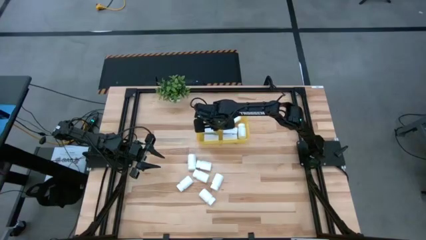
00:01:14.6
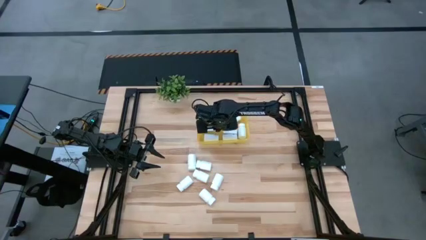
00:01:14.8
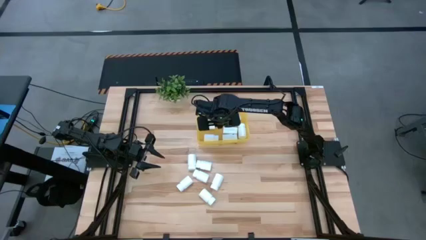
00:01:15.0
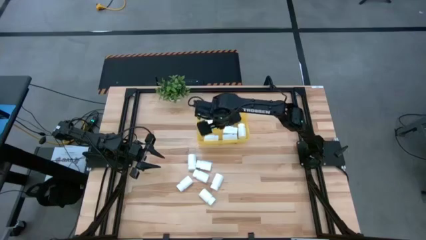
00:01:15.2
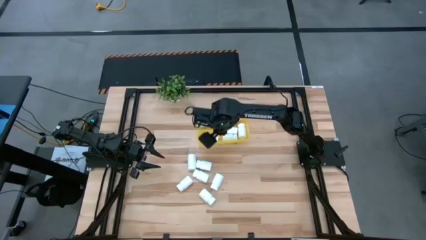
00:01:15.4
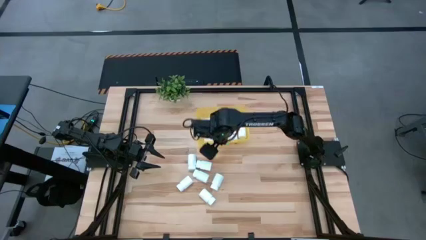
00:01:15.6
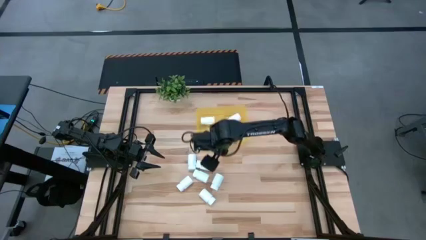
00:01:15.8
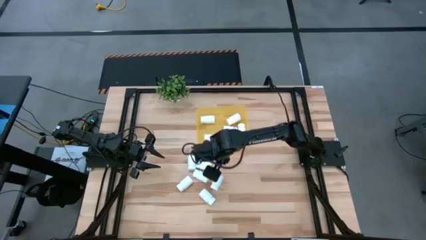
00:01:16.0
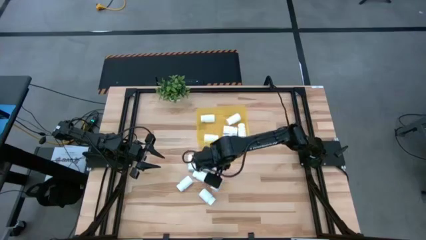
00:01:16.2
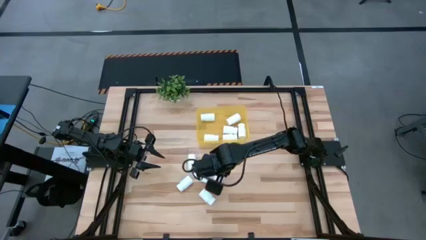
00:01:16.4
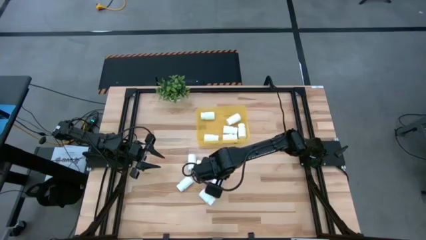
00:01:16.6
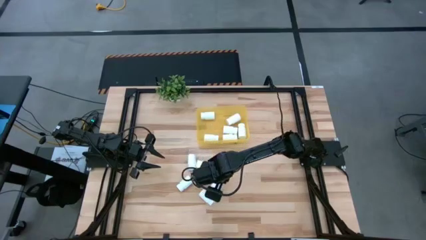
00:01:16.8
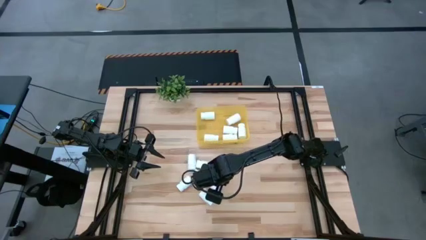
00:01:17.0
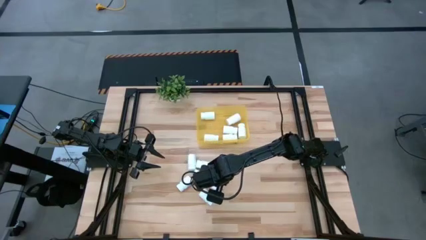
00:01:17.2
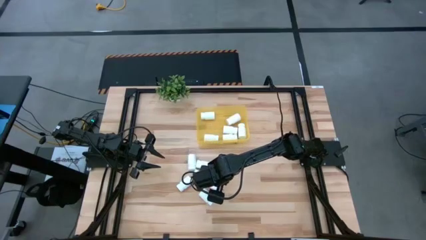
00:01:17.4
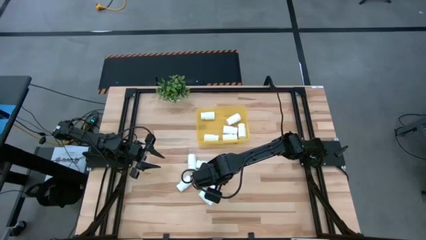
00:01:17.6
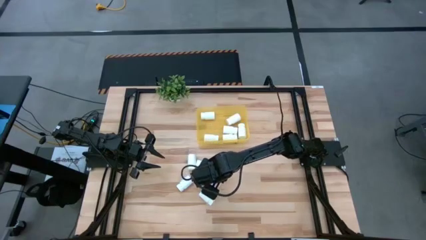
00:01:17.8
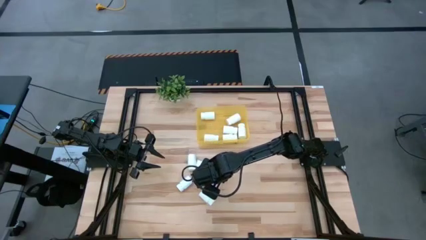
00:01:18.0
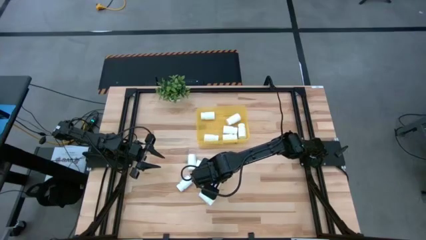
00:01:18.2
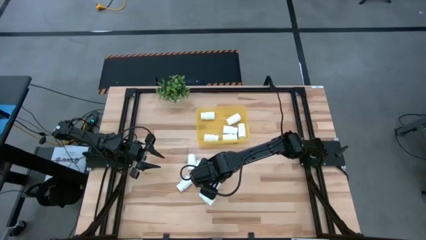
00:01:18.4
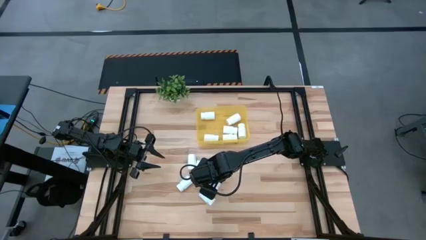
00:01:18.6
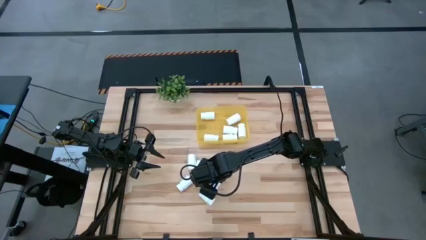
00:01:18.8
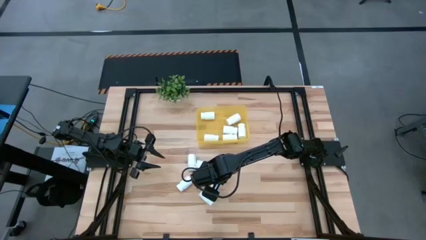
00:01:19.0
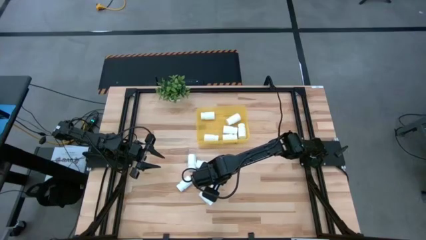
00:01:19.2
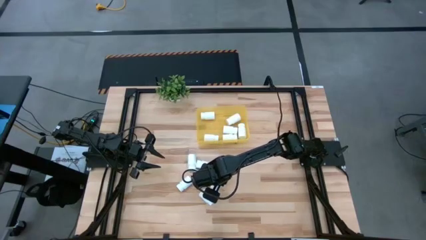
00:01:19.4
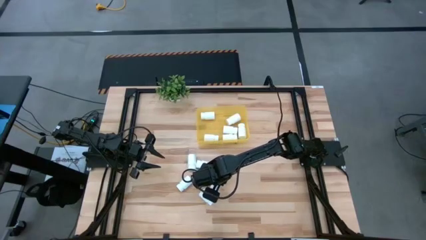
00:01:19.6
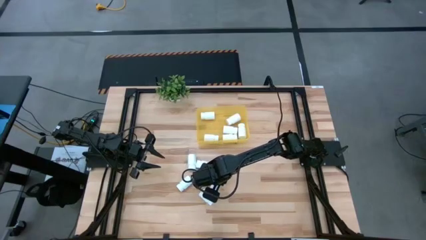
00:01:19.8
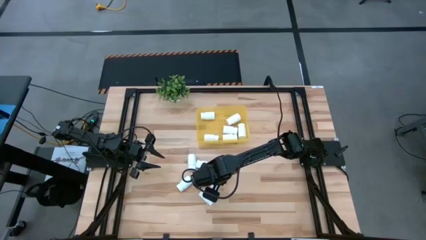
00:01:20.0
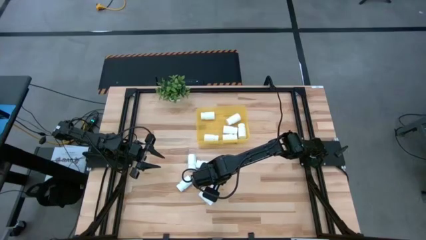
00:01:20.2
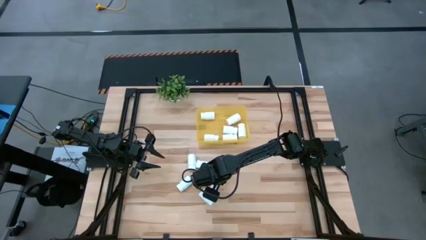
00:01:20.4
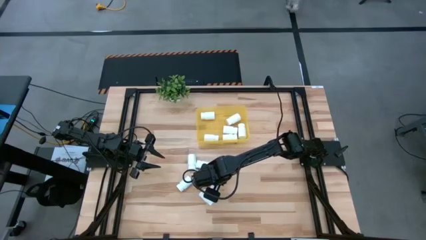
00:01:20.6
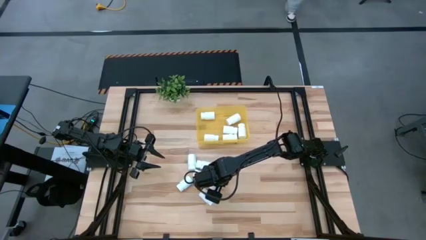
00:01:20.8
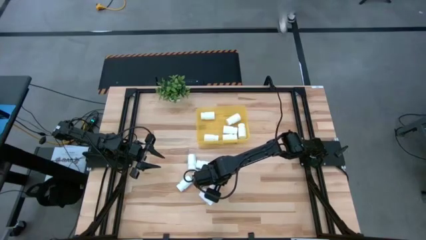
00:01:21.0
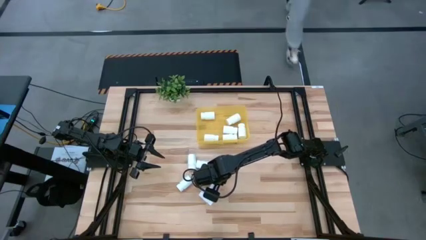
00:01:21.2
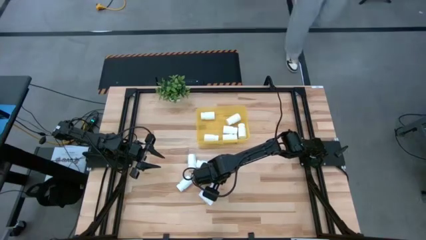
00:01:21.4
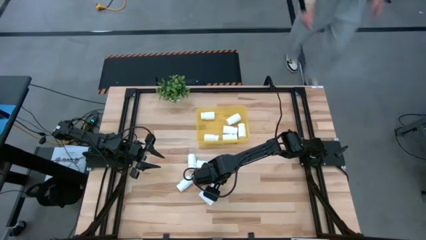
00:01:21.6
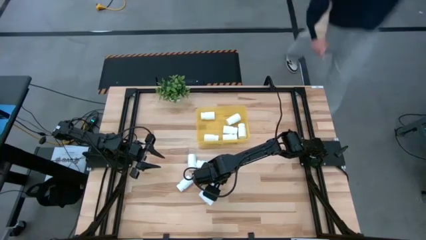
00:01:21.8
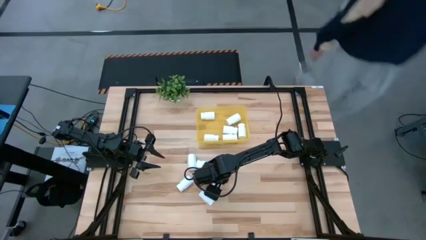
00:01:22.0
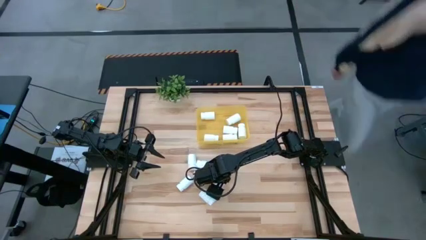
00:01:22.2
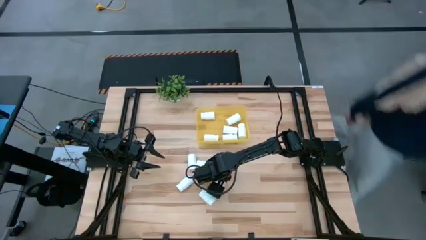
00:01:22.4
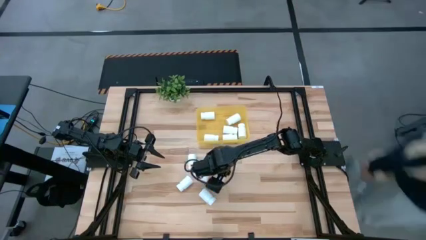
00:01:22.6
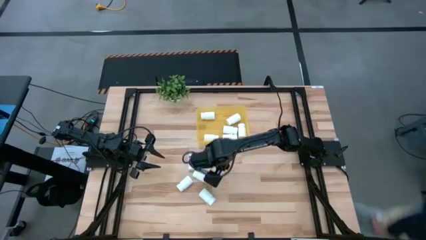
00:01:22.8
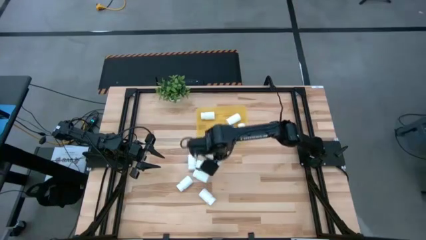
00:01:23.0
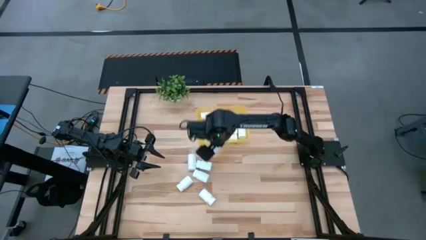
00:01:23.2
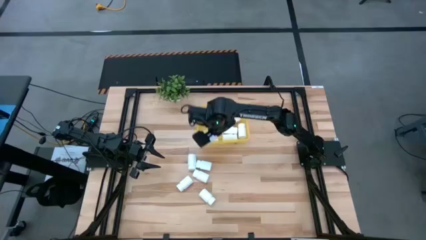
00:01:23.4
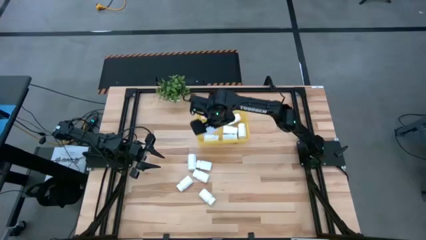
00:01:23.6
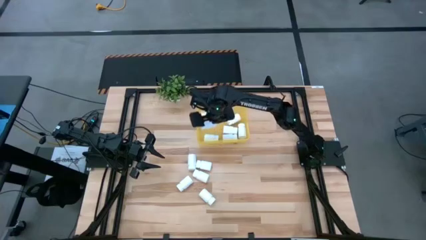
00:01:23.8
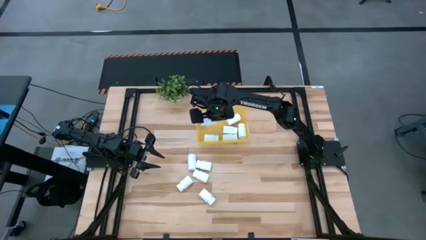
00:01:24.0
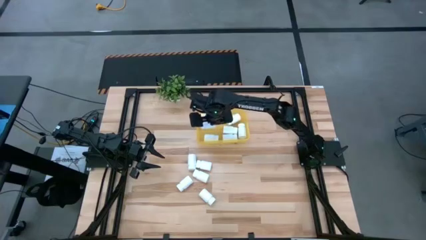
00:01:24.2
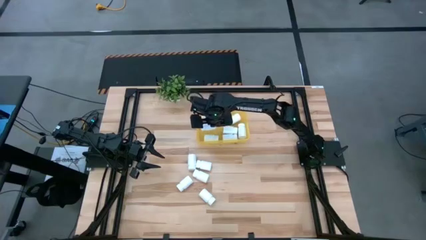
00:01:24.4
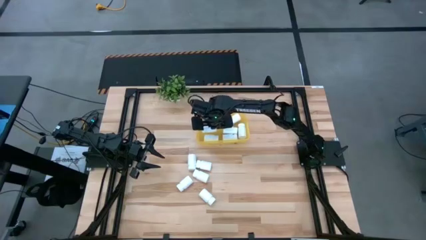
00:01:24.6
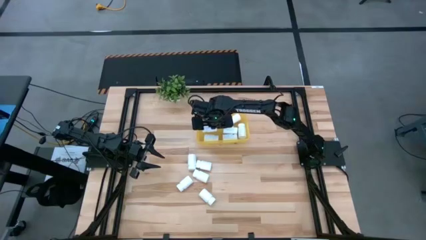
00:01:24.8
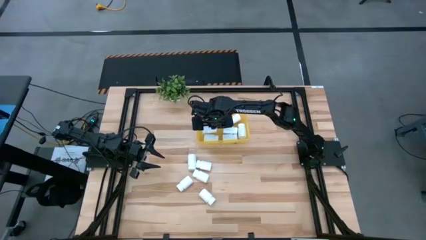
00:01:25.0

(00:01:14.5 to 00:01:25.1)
Task: Pick and place pill bottles into a basket
Put the white pill bottle into the yellow bin

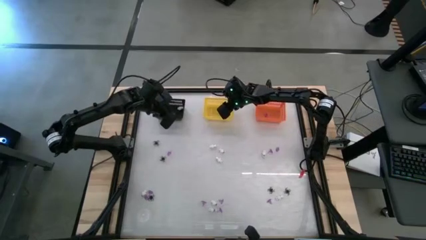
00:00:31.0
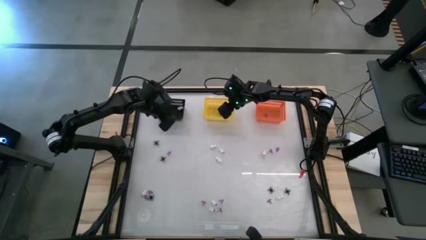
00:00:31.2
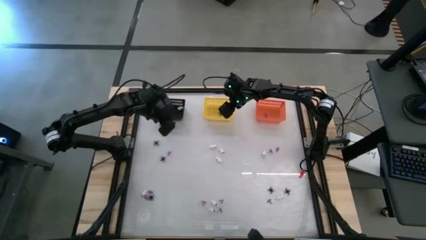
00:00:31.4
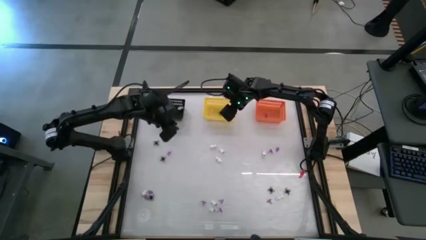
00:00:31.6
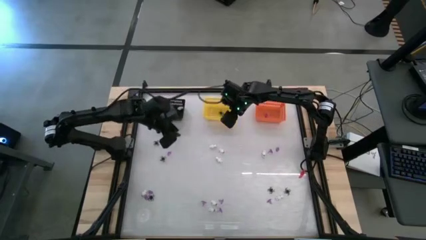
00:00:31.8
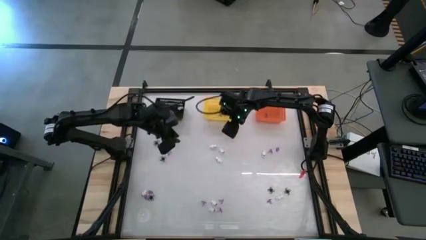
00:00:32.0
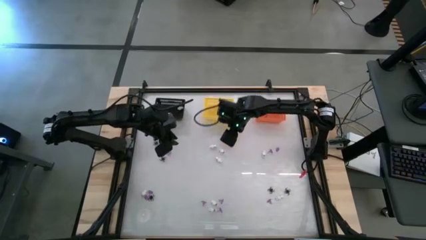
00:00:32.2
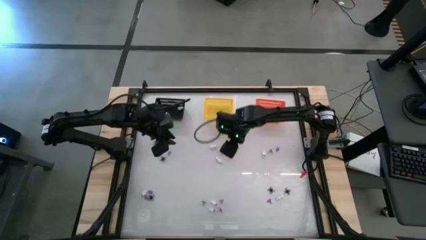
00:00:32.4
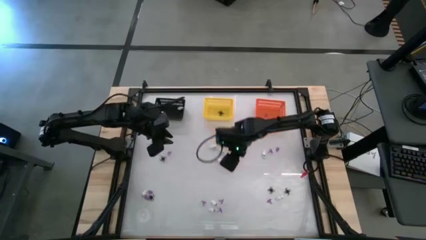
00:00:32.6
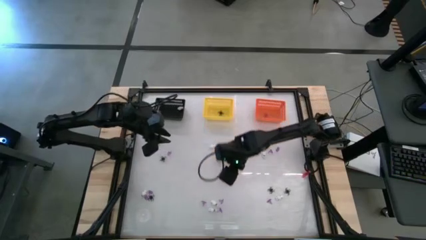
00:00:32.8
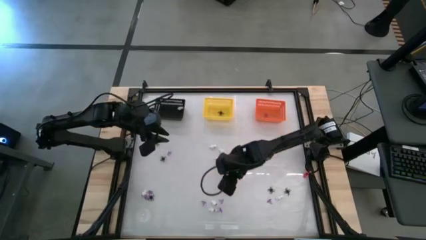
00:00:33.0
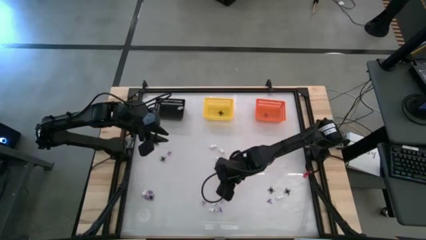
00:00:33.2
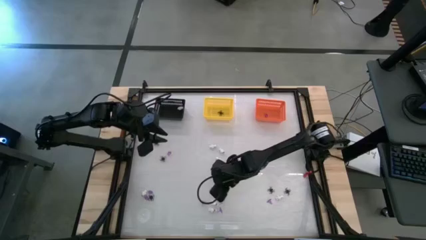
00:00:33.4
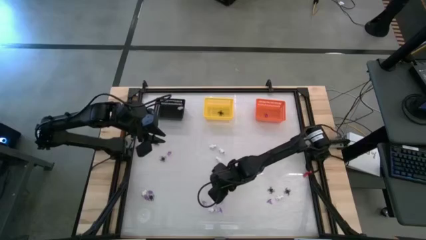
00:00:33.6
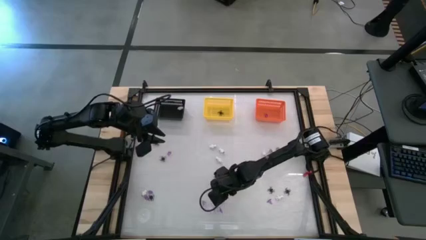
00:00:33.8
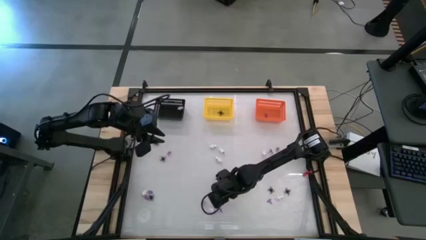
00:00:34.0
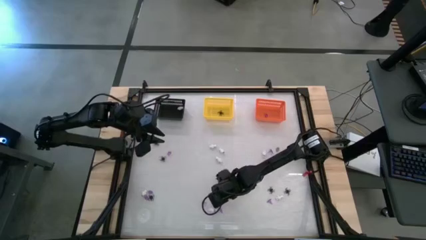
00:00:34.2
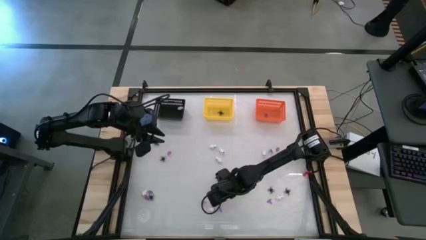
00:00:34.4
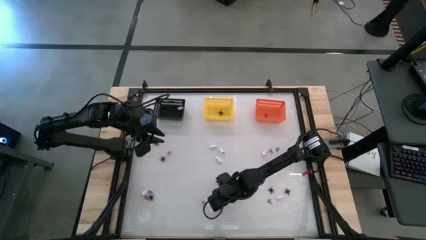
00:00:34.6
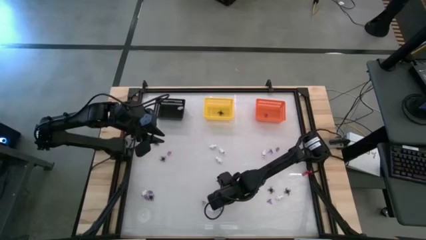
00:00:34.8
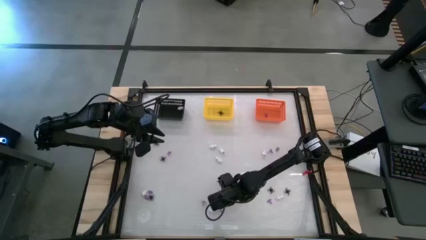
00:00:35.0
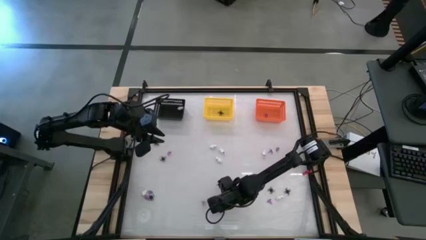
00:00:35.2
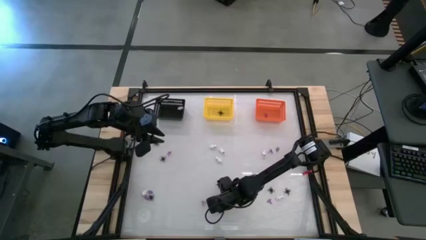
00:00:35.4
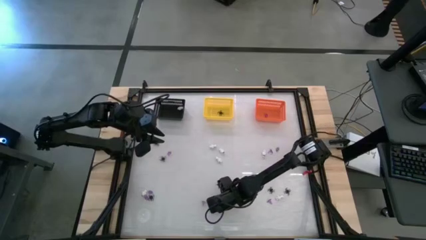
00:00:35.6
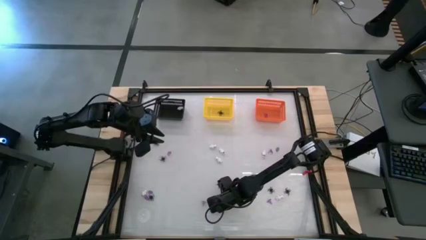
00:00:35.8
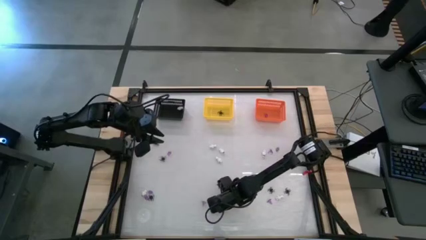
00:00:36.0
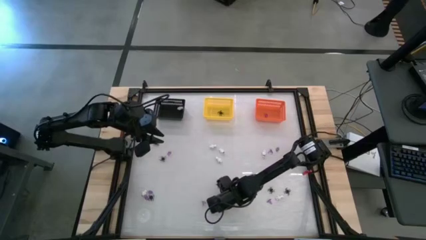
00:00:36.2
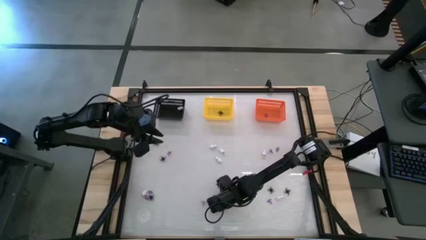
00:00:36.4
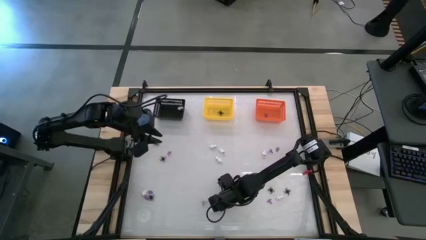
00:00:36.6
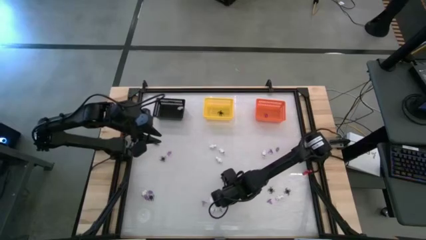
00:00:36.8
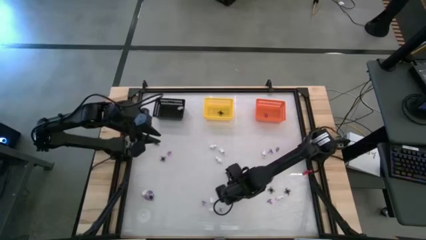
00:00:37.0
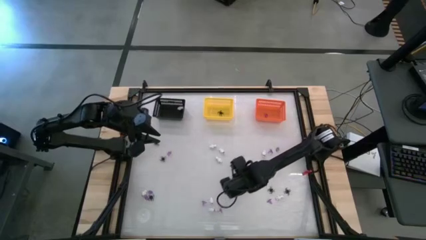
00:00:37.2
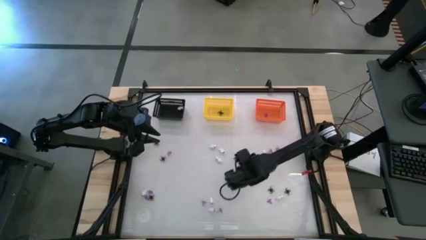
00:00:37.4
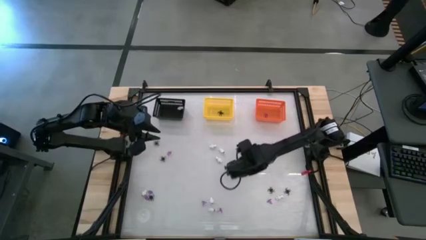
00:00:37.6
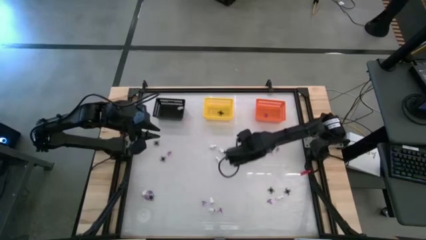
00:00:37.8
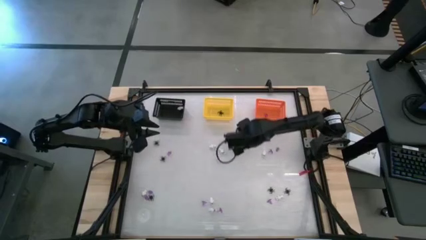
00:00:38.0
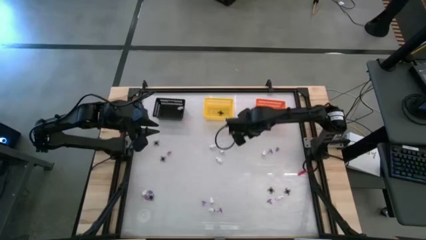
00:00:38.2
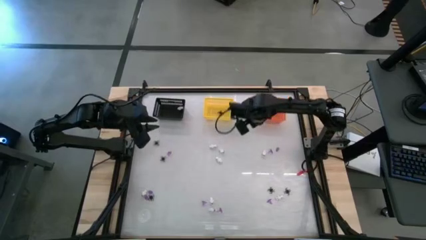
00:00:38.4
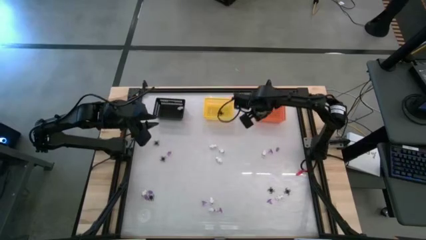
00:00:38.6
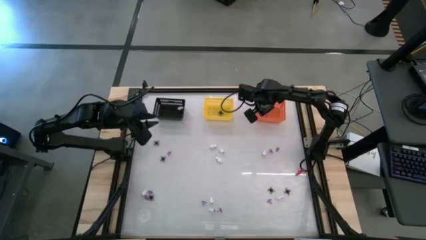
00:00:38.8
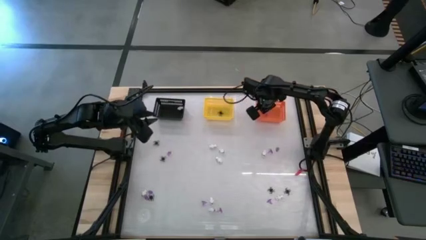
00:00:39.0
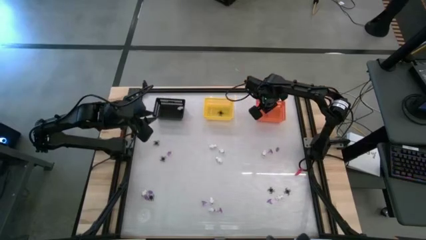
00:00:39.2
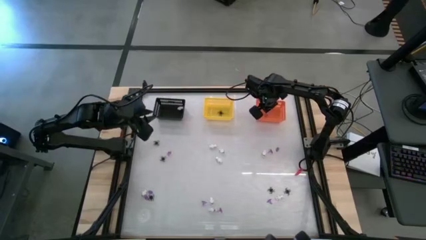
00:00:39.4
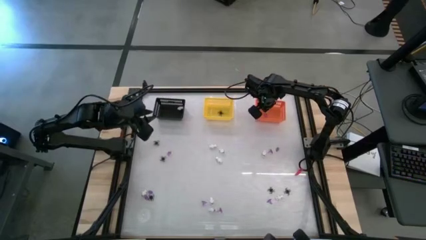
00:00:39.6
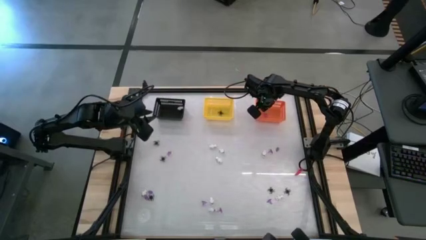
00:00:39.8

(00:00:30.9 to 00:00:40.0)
Task: Sort Halloween decoration
Put the purple witch hat toy into the orange basket
